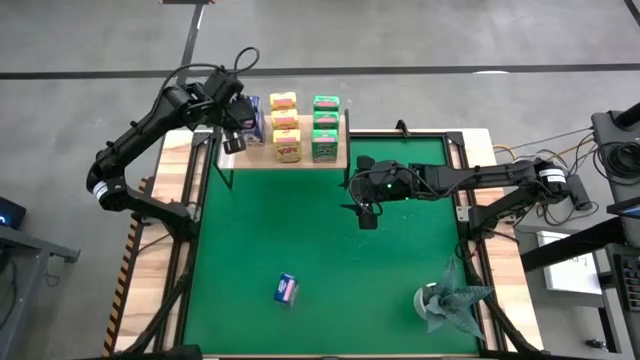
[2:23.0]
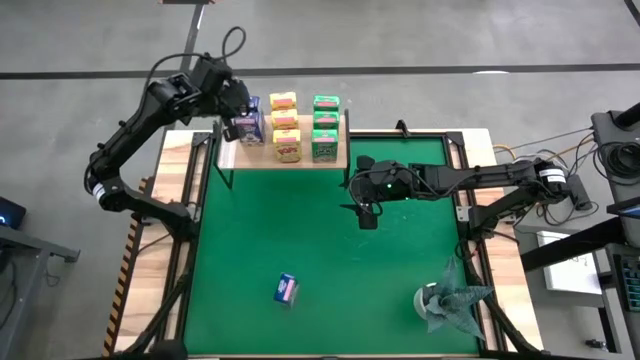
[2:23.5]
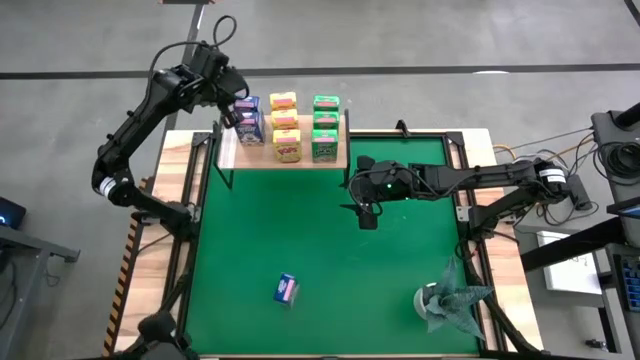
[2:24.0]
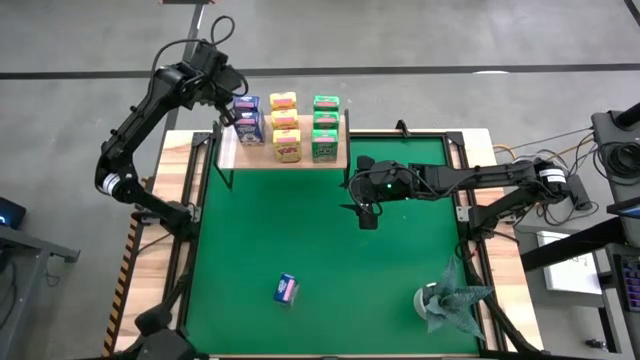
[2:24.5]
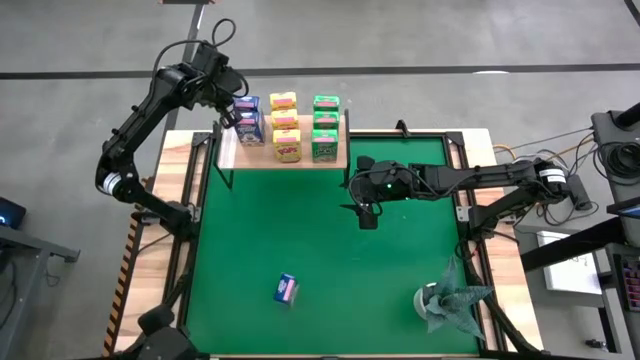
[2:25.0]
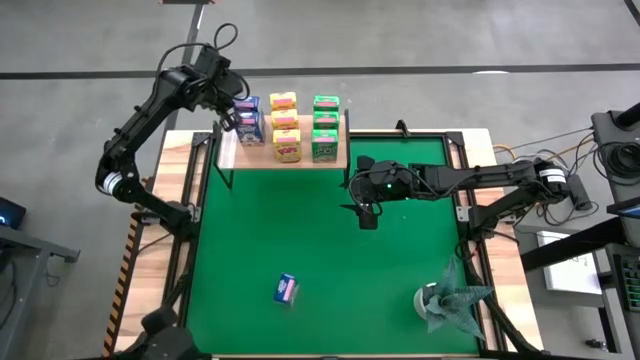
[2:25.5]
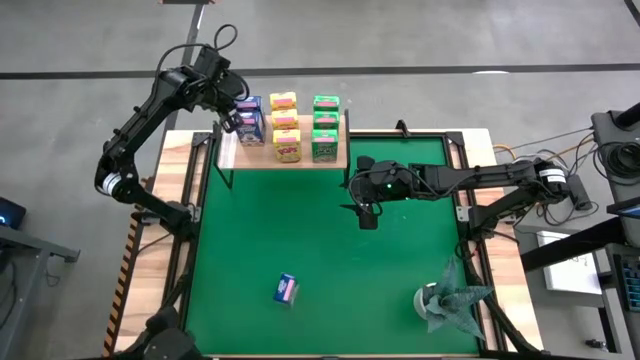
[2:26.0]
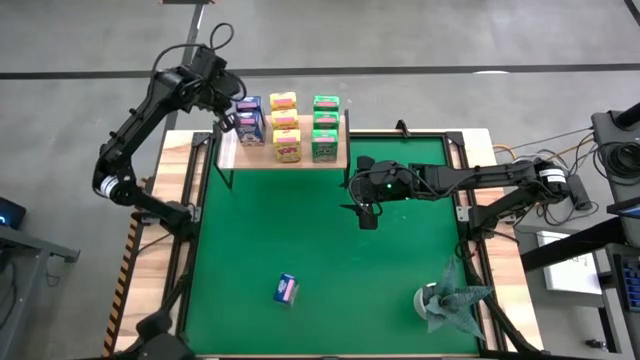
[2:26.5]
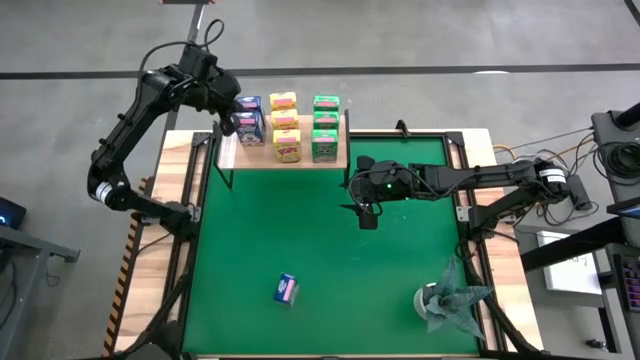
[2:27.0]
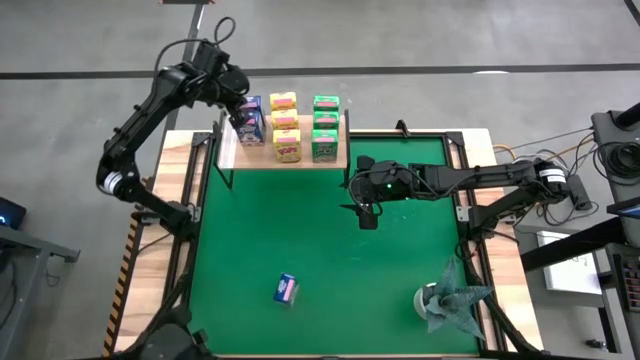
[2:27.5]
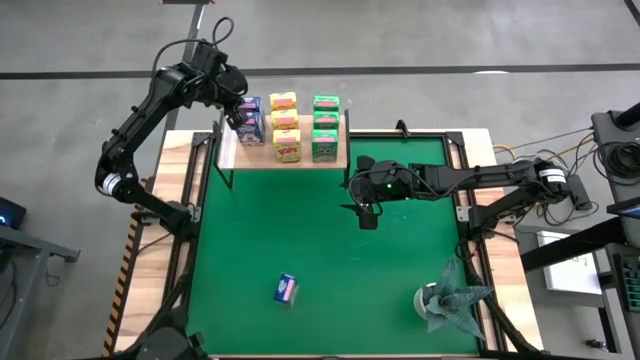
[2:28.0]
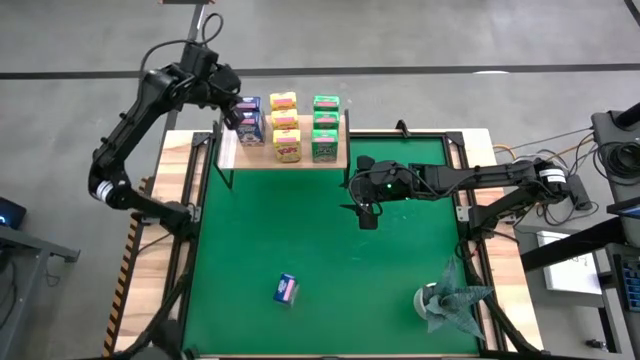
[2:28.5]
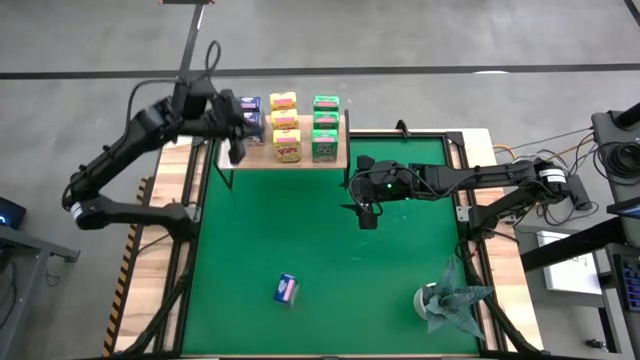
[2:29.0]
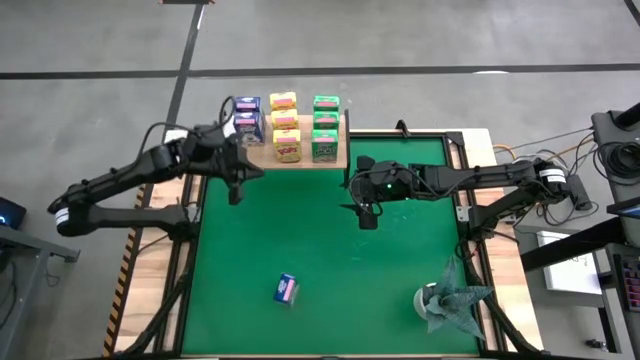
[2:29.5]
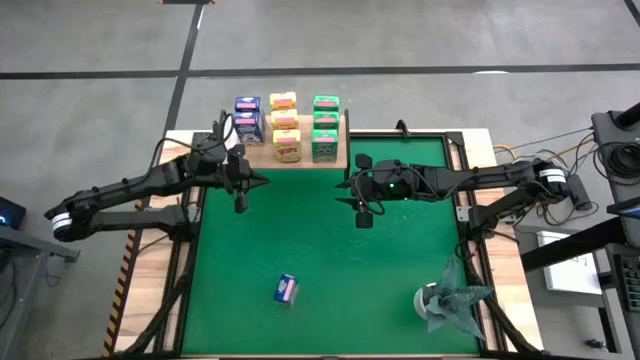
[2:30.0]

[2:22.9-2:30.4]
Task: Stack cereal on shelf
Adjust the blue cereal box on the shelf

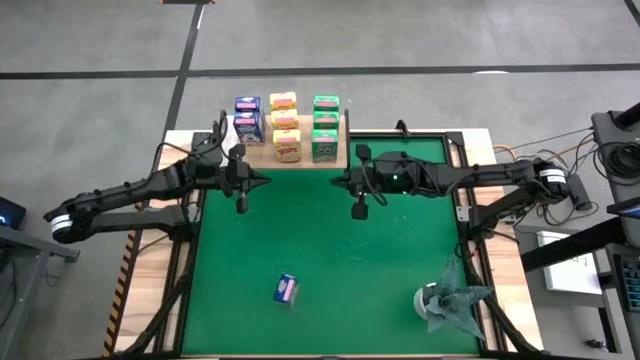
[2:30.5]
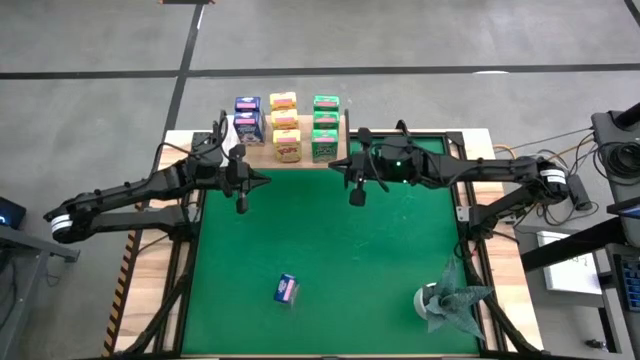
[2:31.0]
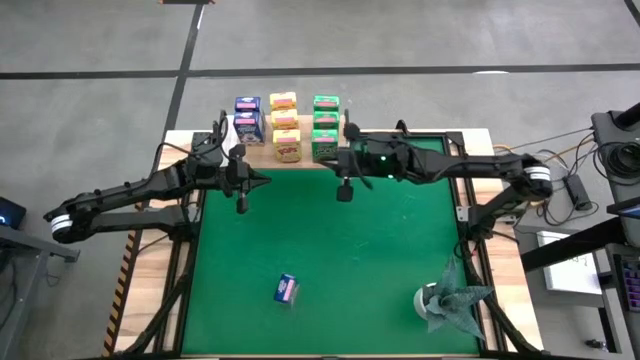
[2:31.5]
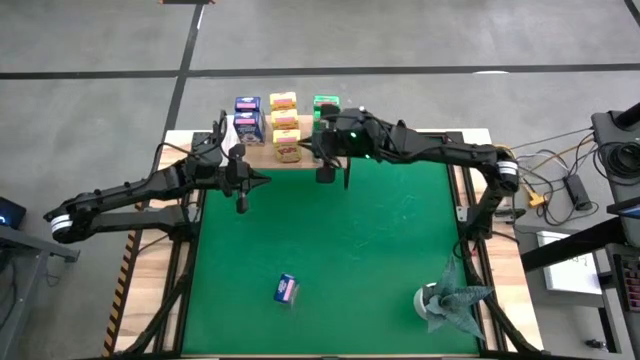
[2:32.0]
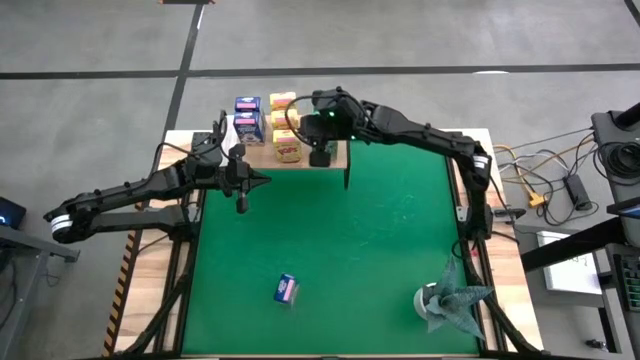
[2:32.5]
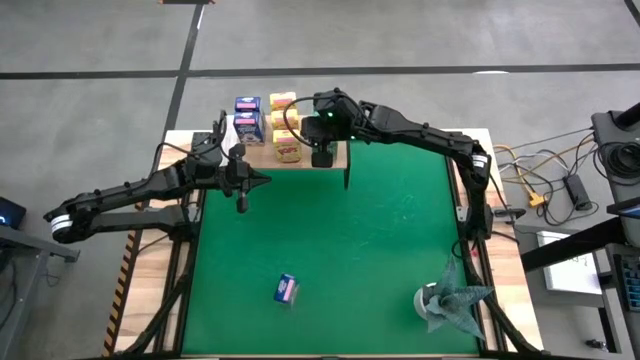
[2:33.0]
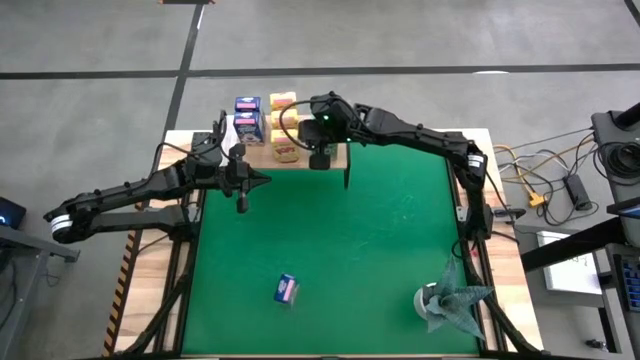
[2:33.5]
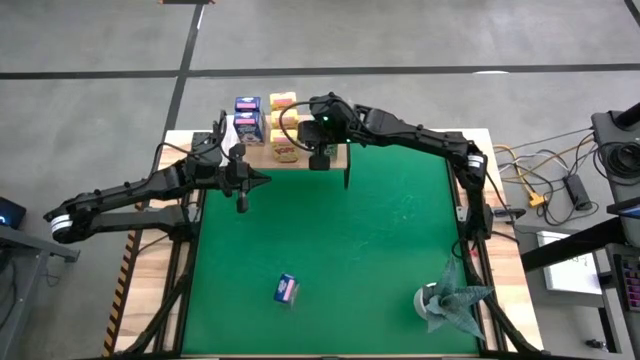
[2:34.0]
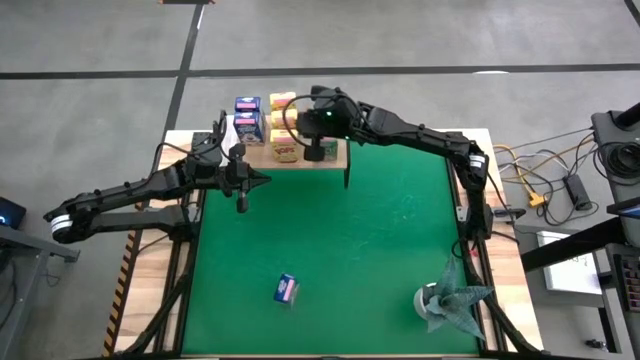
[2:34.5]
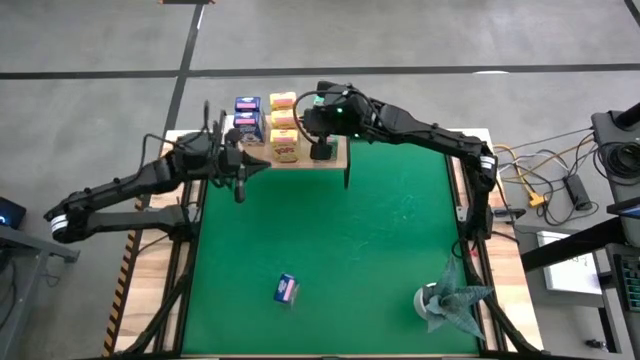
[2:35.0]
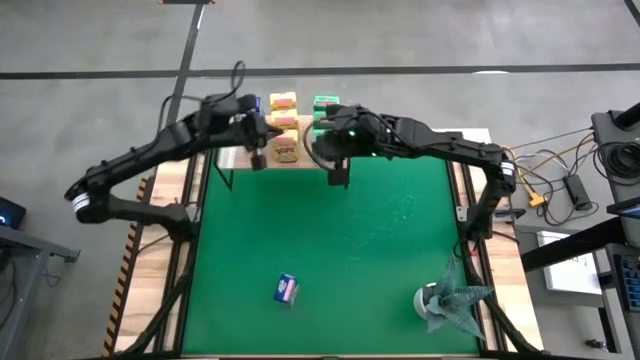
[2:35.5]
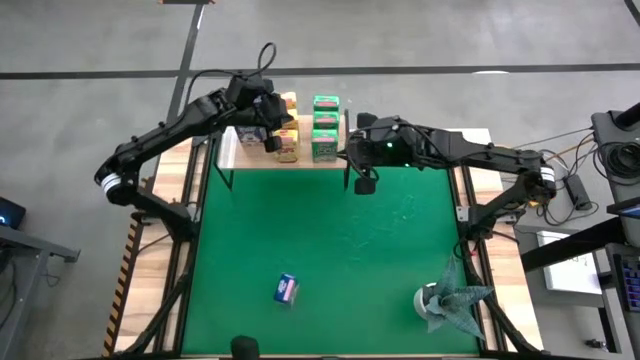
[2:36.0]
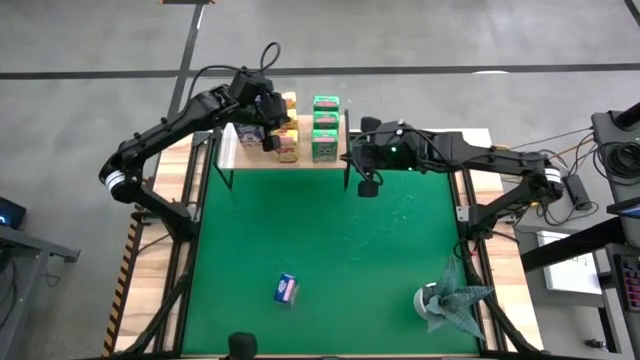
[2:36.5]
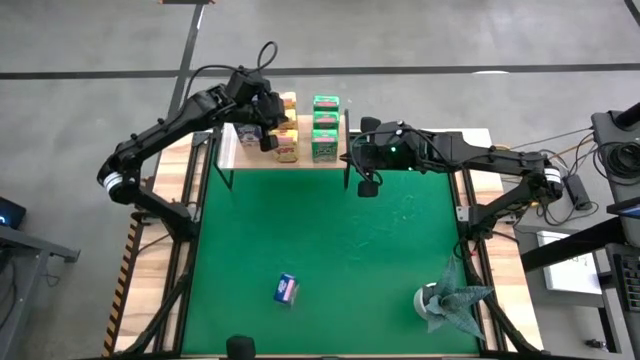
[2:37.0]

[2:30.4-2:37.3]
Adjust the yellow cereal boxes on the shelf

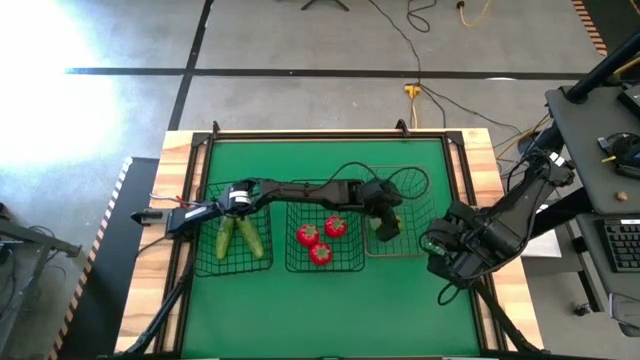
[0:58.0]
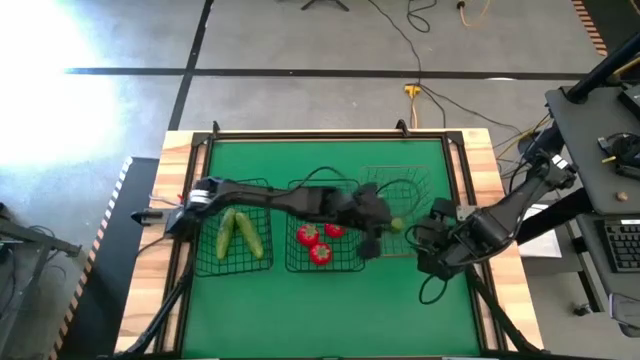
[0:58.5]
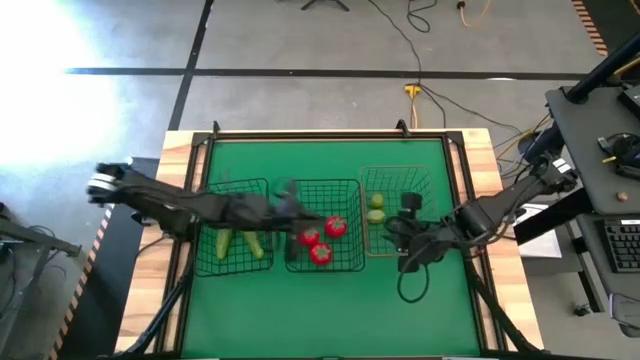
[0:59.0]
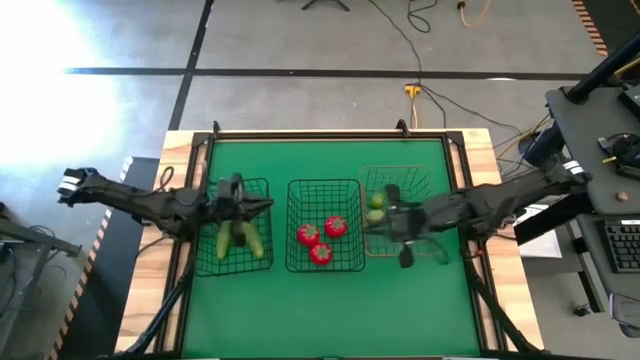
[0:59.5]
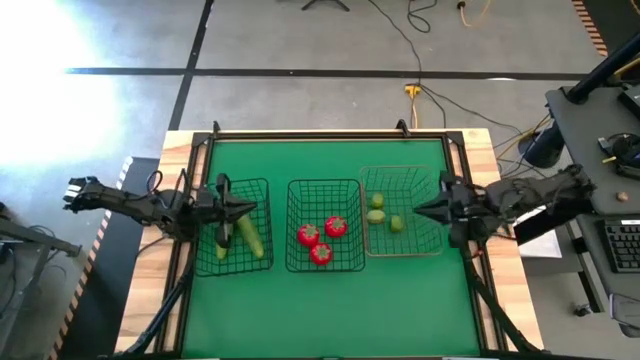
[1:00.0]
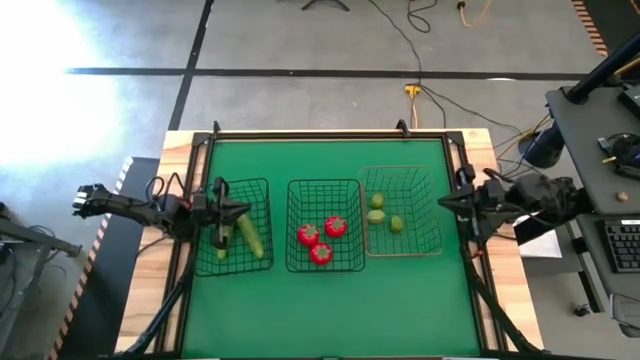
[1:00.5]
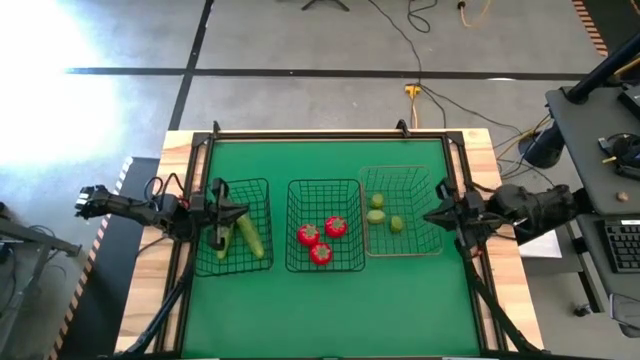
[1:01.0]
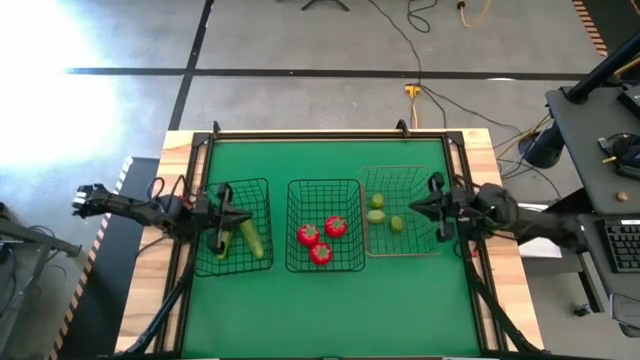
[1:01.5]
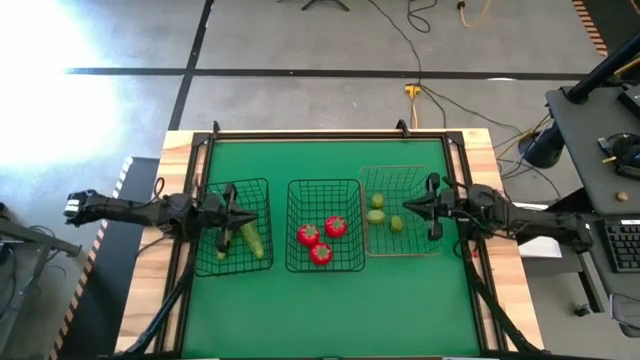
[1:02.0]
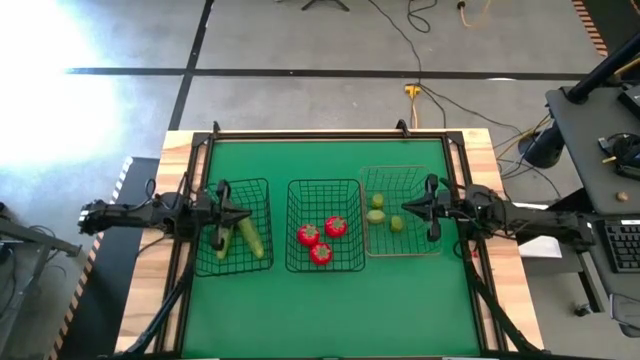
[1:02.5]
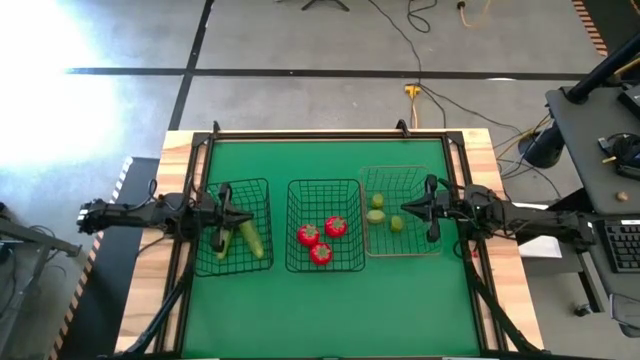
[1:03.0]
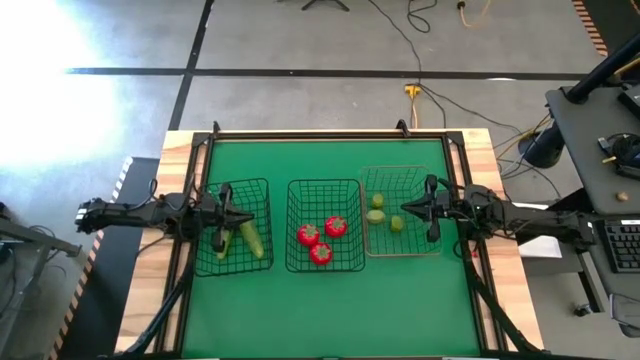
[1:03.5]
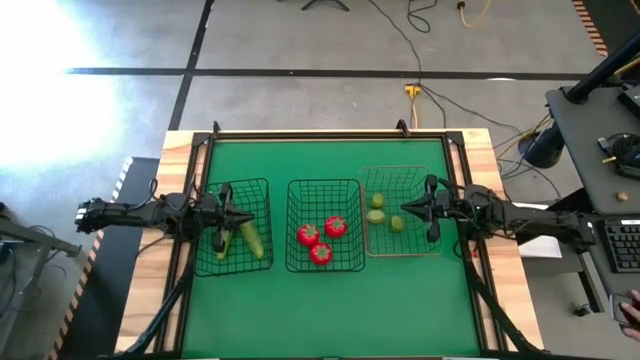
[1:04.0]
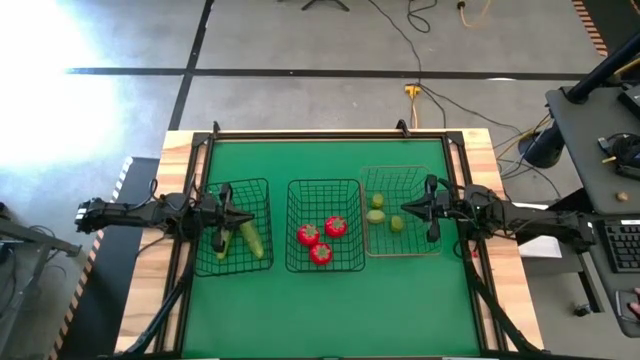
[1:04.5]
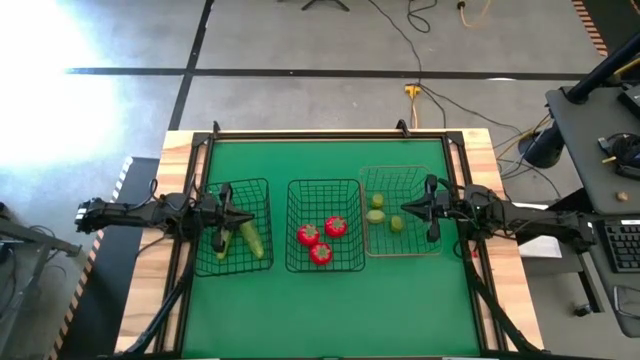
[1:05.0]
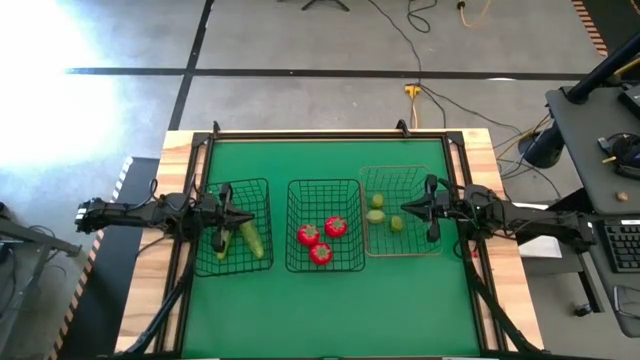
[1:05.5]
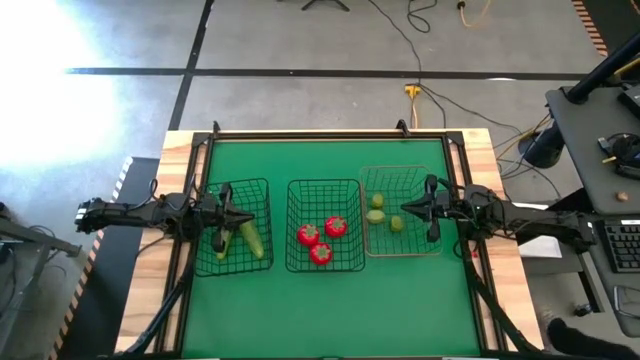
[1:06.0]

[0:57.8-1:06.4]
Task: Sort produce into baskets
Return to Home Position
